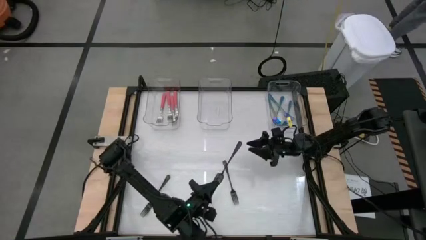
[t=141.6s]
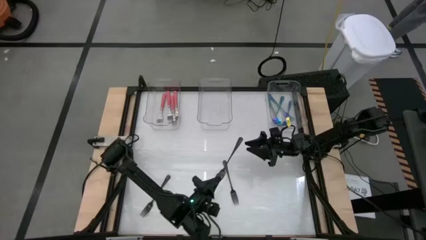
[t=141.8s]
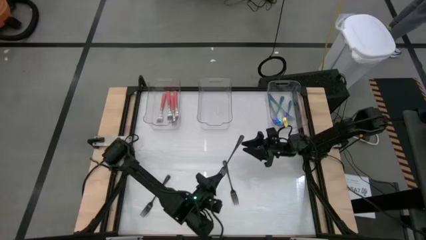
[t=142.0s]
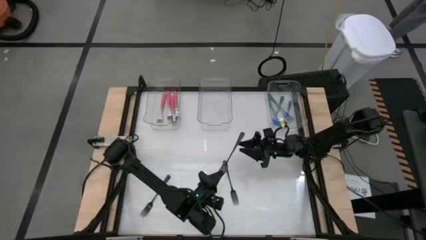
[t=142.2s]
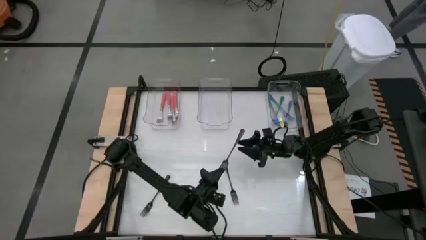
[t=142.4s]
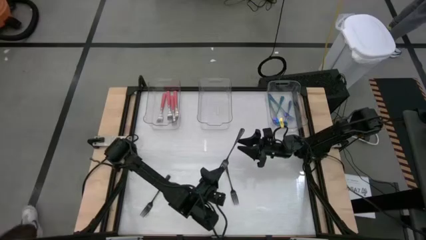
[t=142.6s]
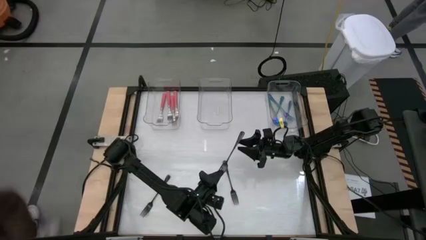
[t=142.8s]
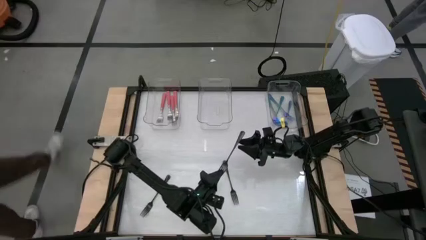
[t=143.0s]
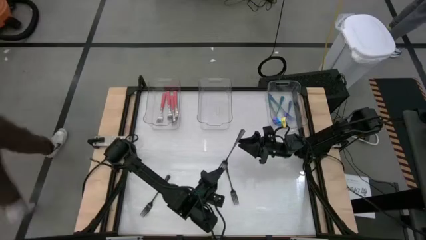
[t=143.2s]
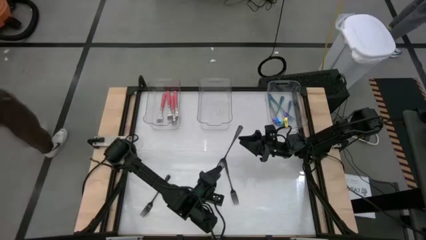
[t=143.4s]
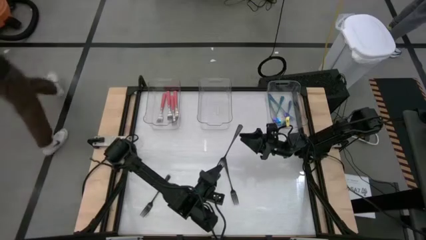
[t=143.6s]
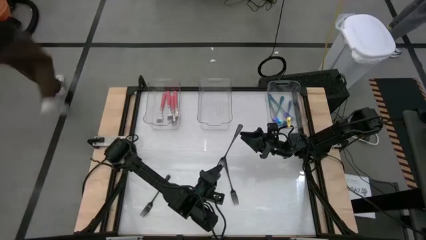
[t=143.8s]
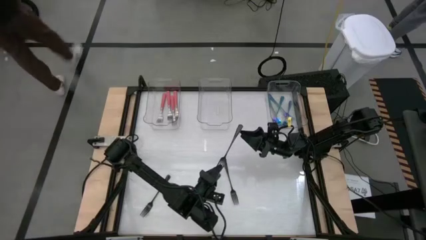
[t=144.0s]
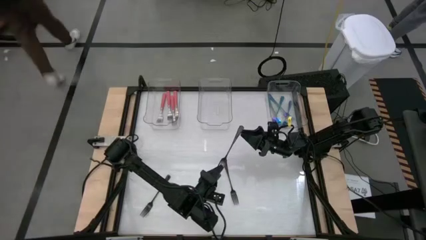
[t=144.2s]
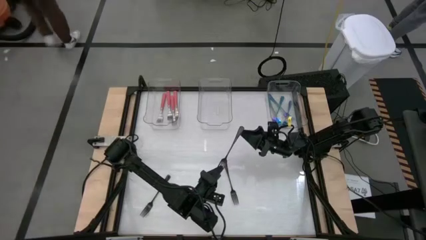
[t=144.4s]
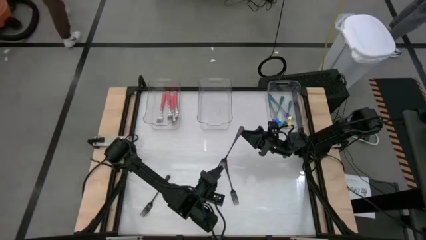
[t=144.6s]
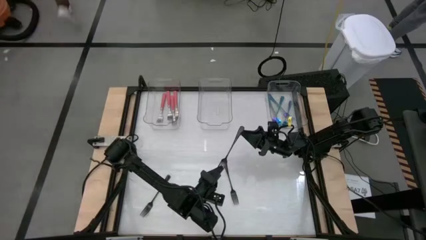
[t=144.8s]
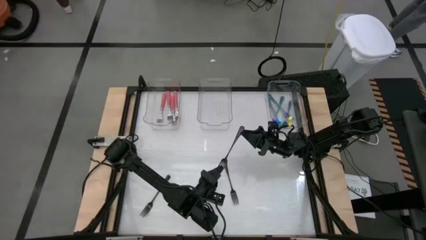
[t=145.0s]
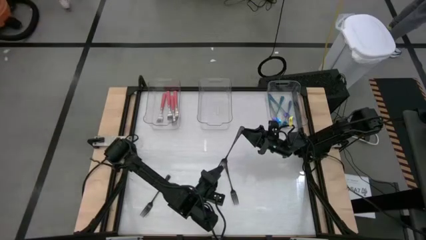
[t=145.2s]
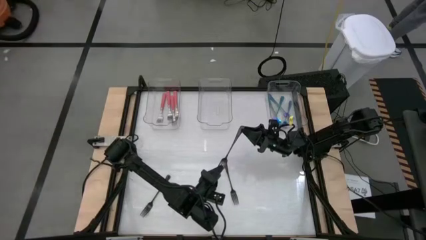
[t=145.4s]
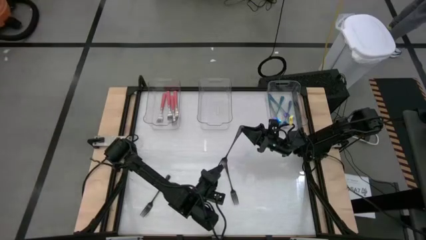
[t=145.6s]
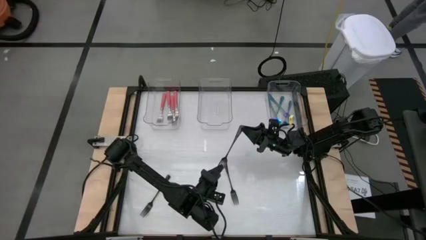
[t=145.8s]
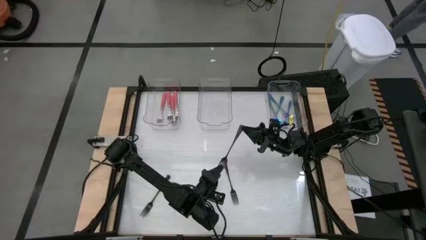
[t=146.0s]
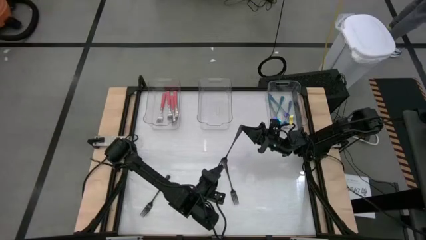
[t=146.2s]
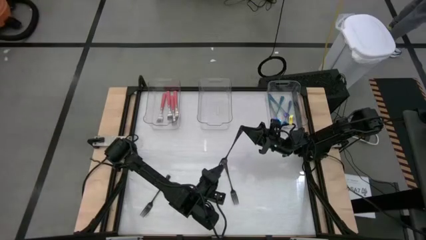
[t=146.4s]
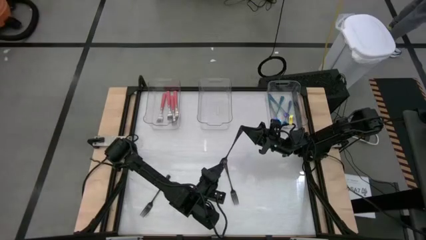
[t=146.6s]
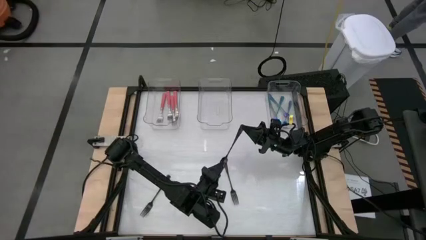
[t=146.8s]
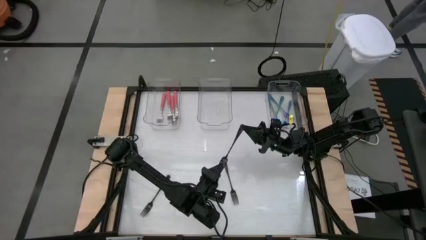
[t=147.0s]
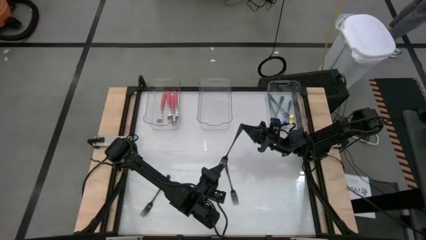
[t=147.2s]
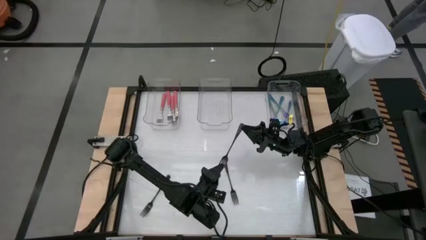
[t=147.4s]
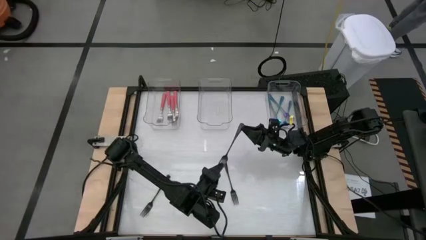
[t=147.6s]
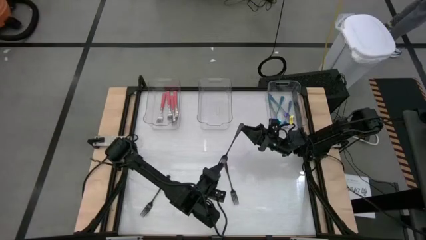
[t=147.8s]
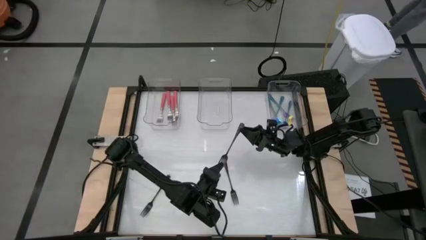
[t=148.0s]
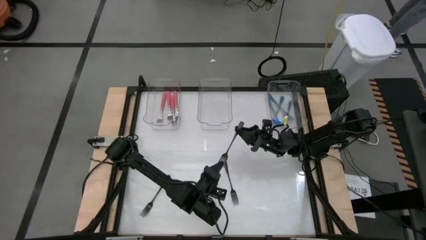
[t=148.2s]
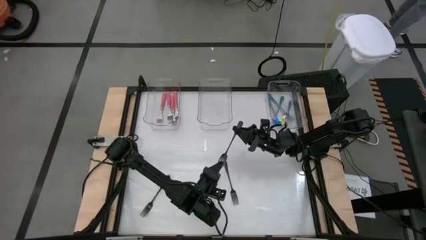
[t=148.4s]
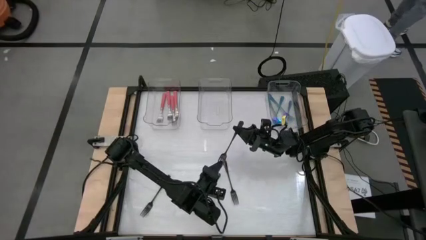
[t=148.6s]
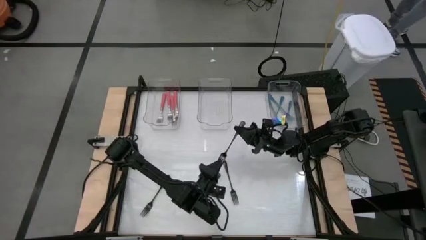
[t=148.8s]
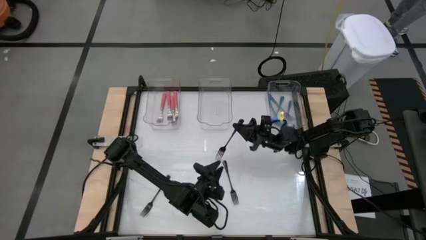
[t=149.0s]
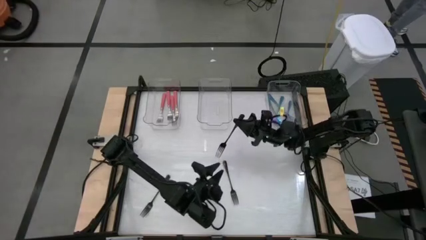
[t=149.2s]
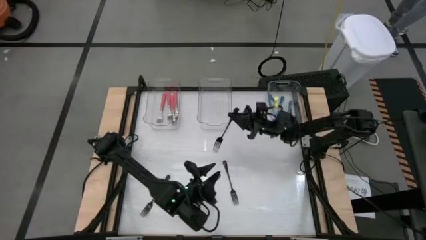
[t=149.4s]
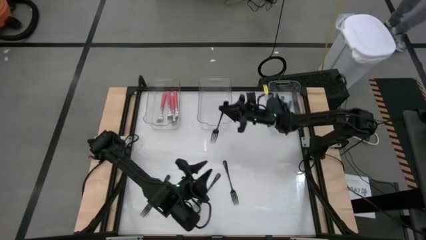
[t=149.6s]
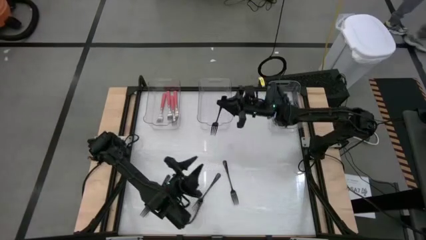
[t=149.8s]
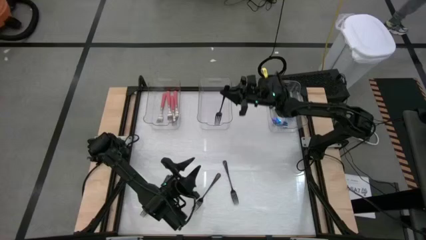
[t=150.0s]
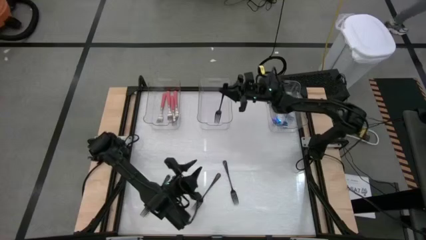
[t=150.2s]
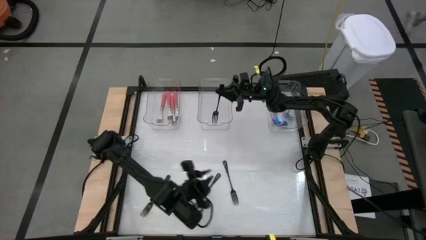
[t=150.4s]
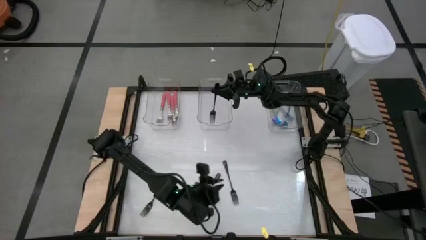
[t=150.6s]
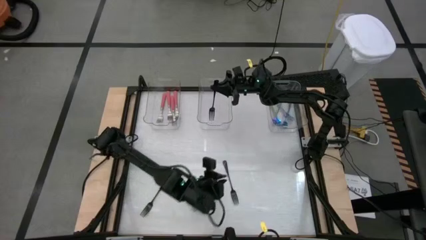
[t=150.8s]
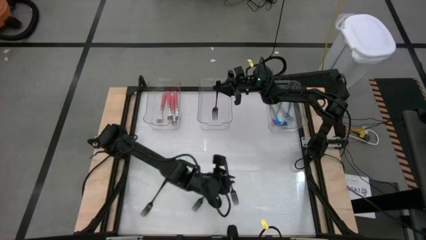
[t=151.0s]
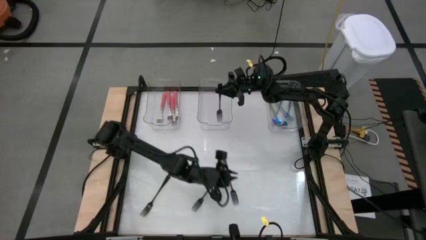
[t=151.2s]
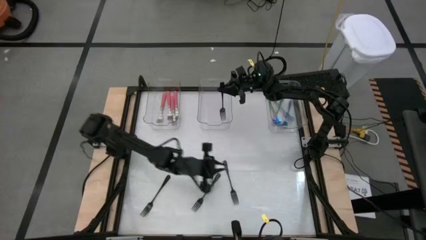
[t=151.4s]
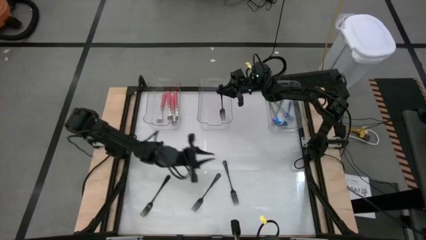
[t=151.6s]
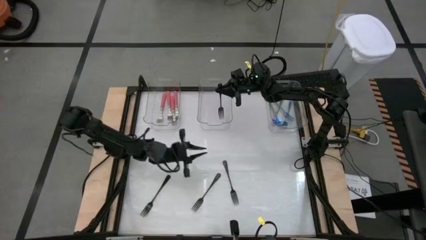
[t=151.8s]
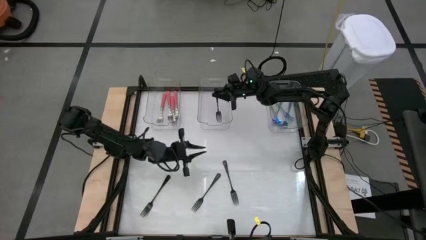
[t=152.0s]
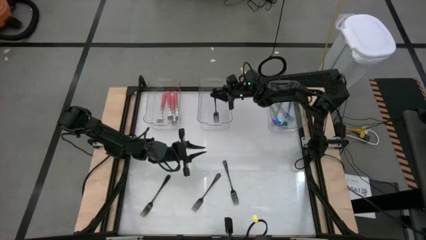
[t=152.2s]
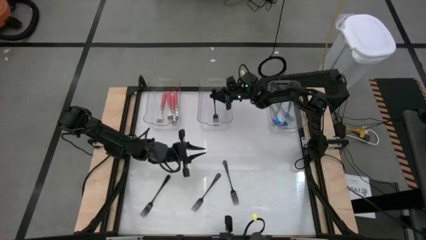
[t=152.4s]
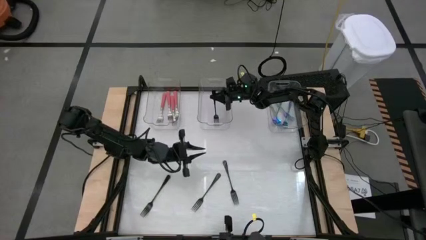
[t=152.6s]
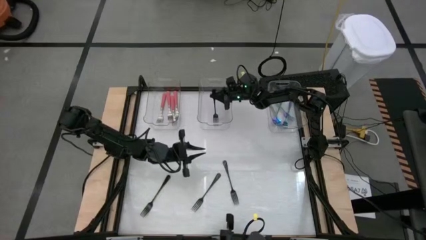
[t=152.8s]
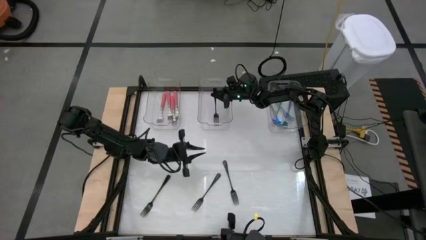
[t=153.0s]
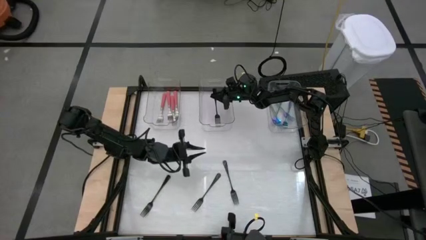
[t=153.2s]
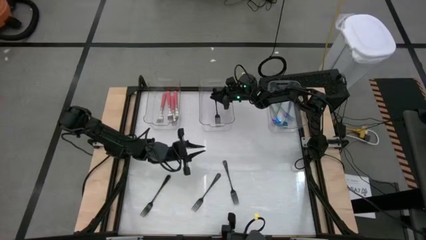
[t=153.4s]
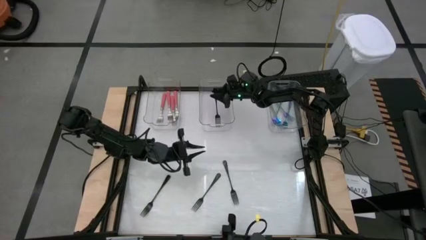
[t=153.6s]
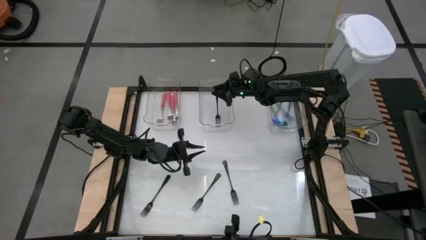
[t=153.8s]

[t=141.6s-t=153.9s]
Task: Sort silverware by color (type)
Put the black fork into the middle transparent bin
